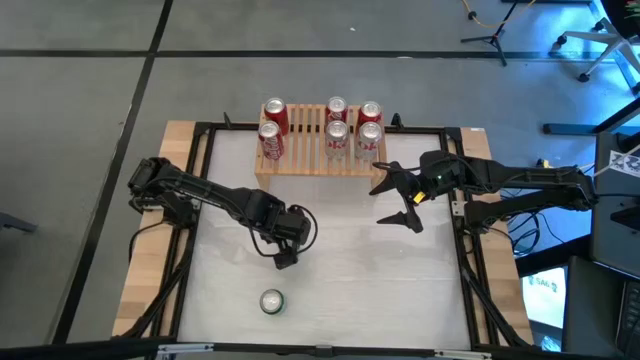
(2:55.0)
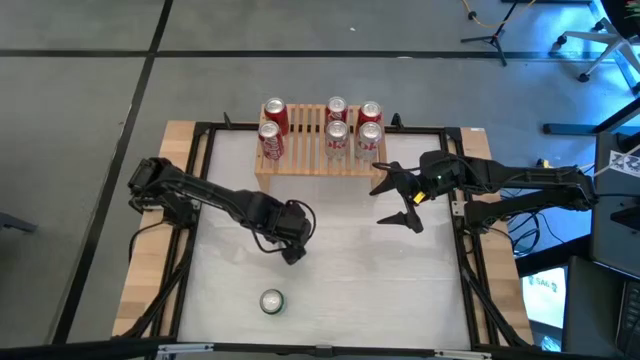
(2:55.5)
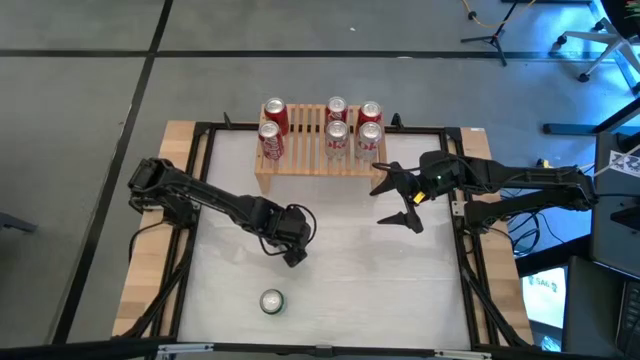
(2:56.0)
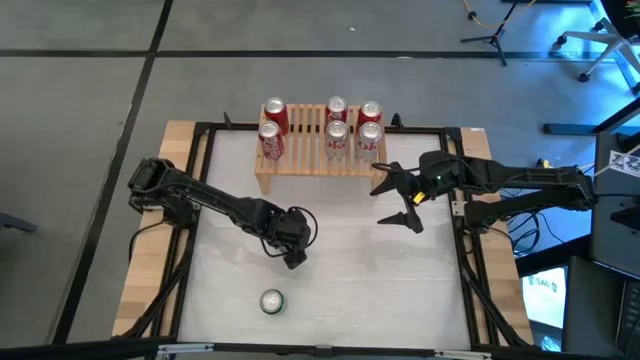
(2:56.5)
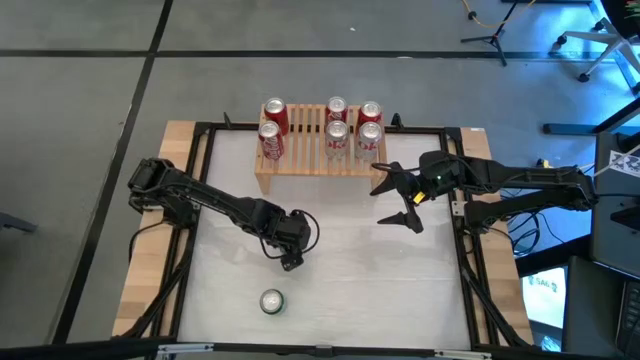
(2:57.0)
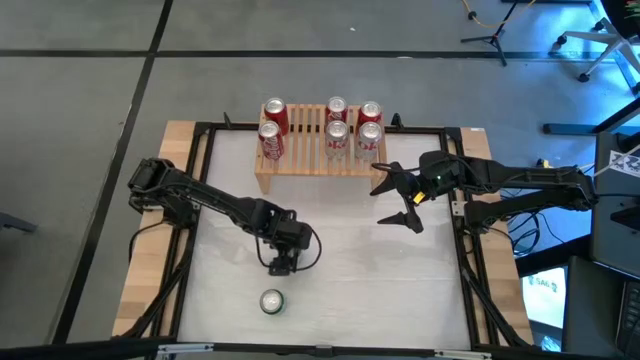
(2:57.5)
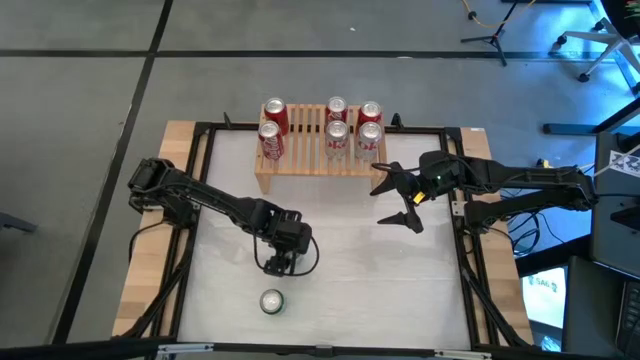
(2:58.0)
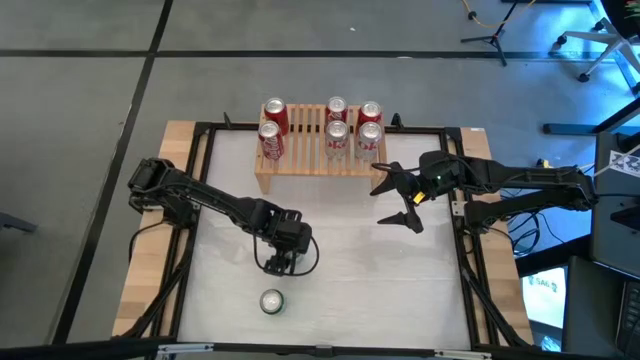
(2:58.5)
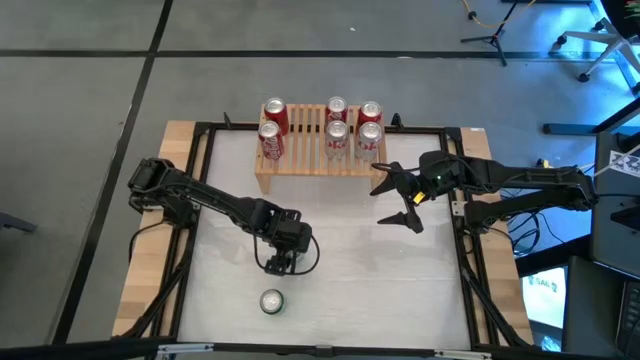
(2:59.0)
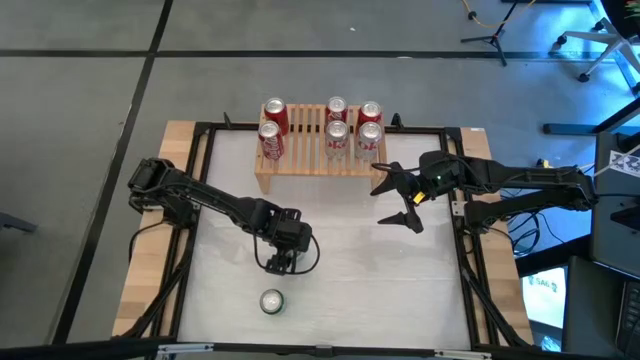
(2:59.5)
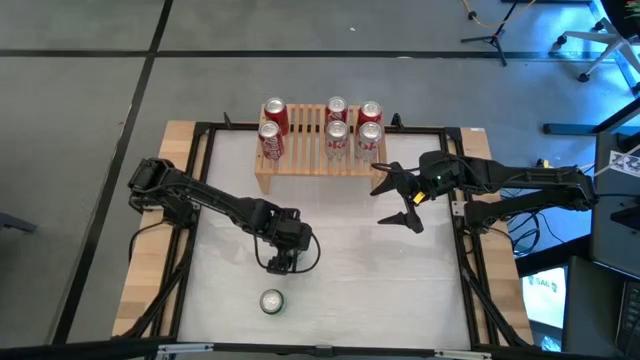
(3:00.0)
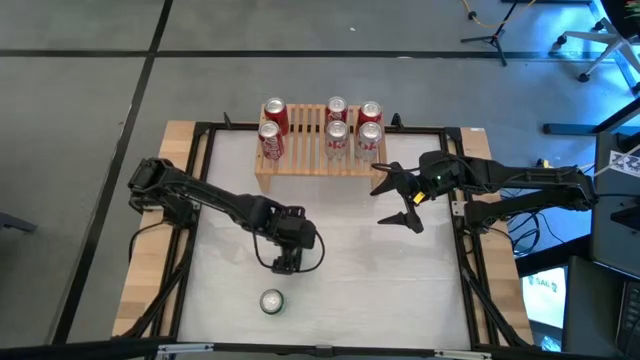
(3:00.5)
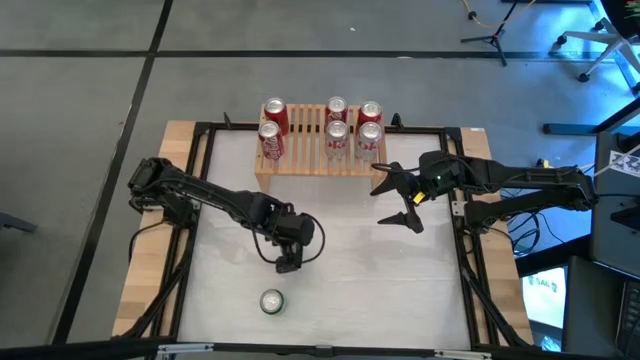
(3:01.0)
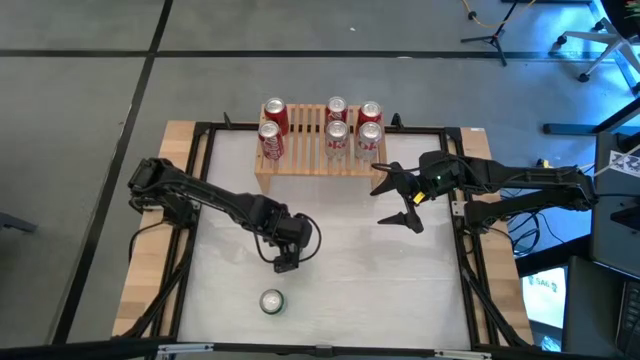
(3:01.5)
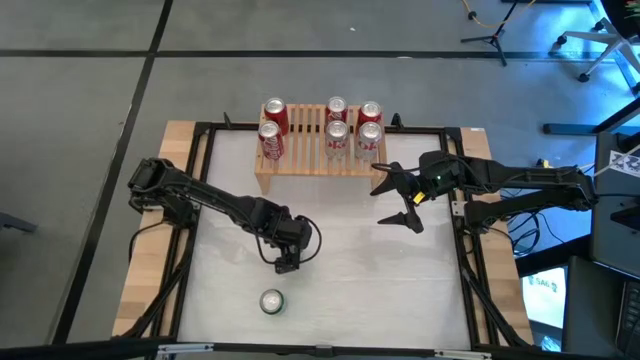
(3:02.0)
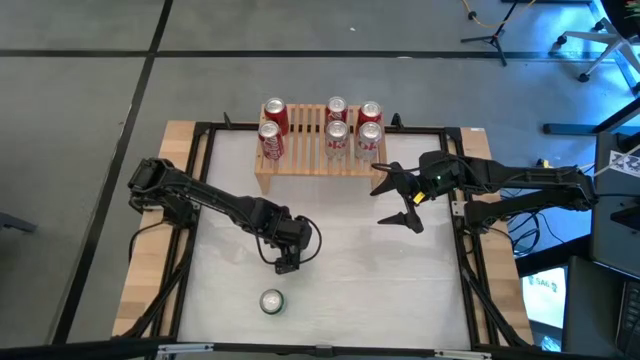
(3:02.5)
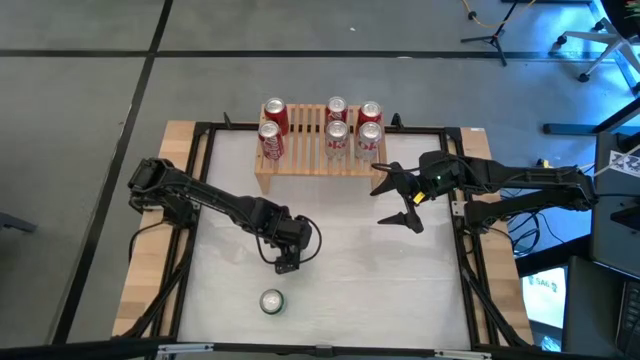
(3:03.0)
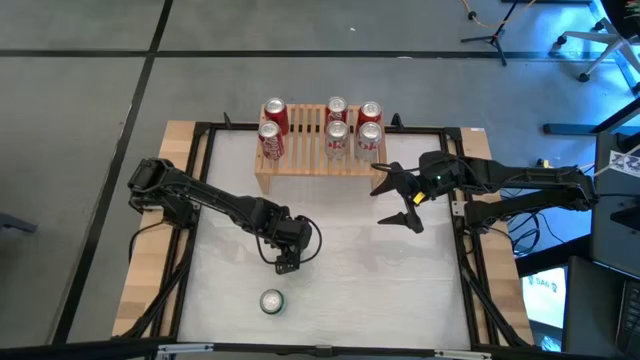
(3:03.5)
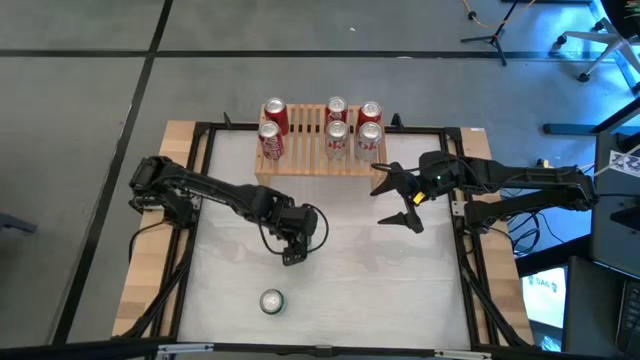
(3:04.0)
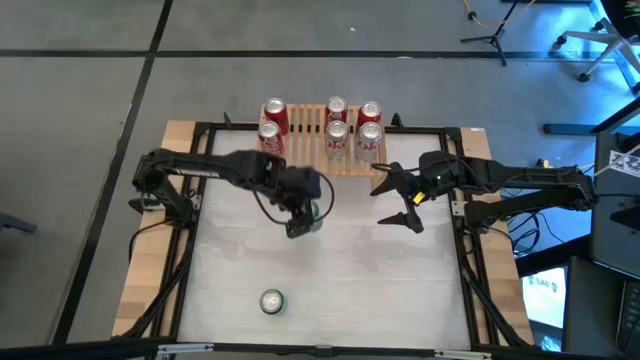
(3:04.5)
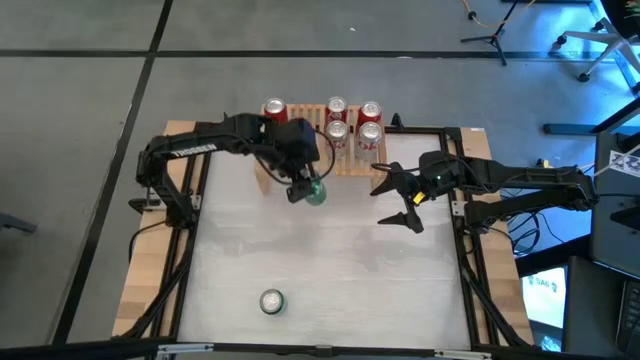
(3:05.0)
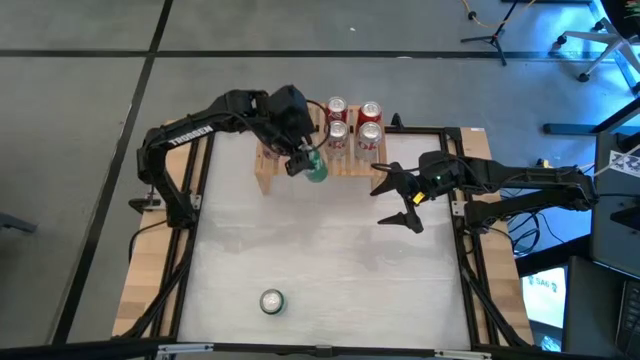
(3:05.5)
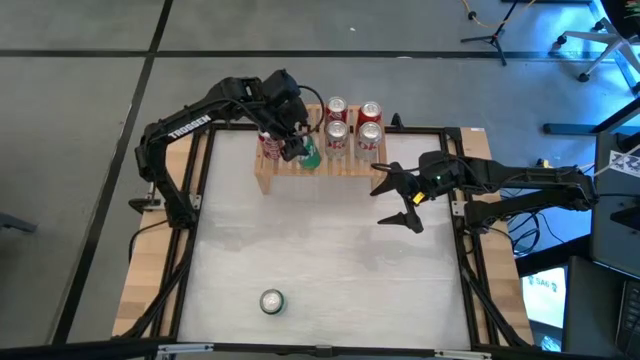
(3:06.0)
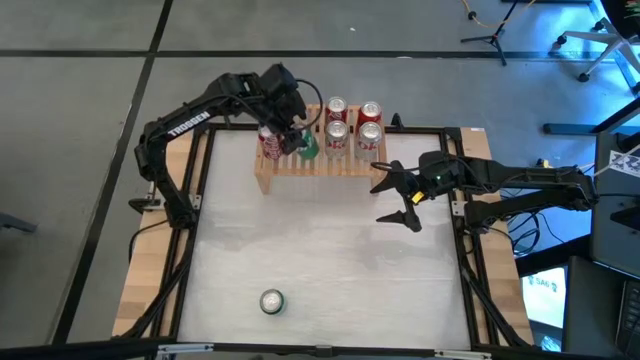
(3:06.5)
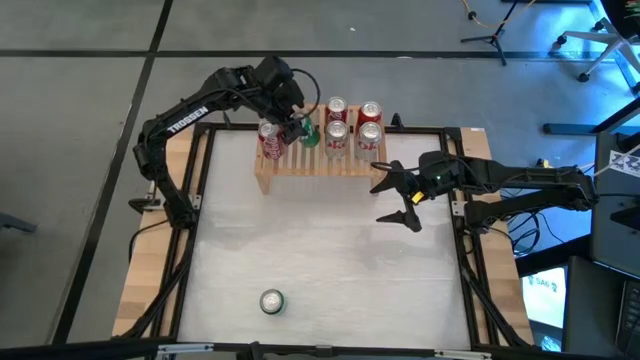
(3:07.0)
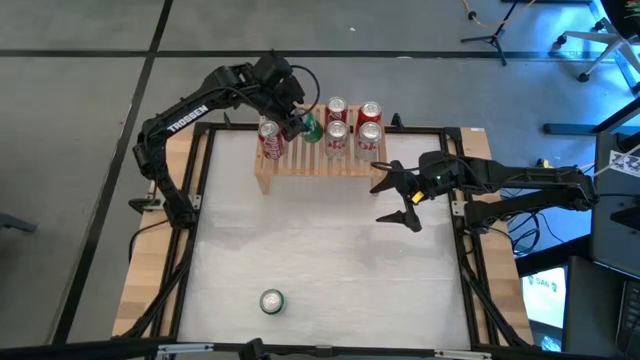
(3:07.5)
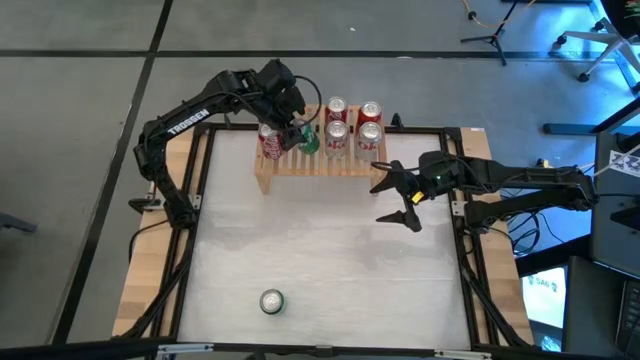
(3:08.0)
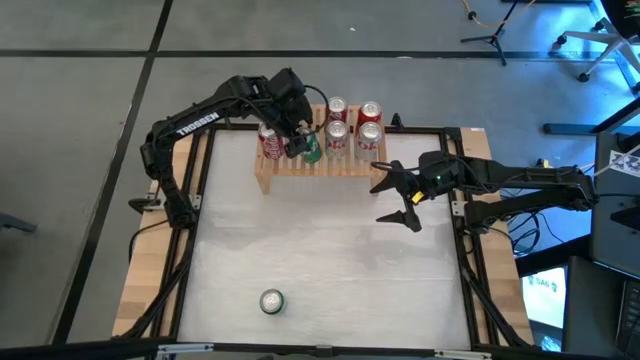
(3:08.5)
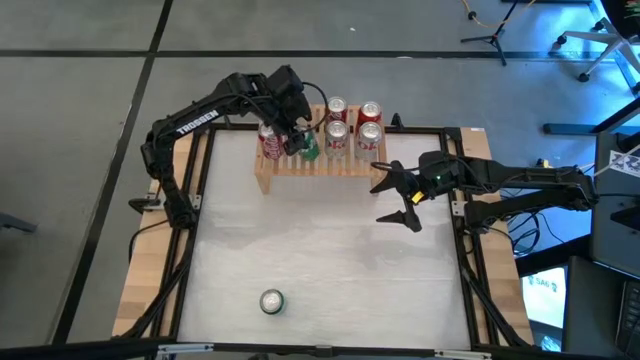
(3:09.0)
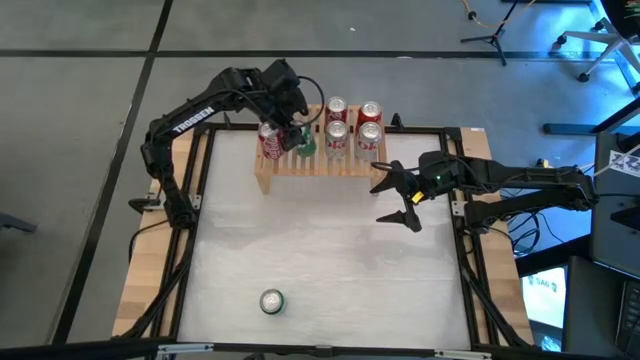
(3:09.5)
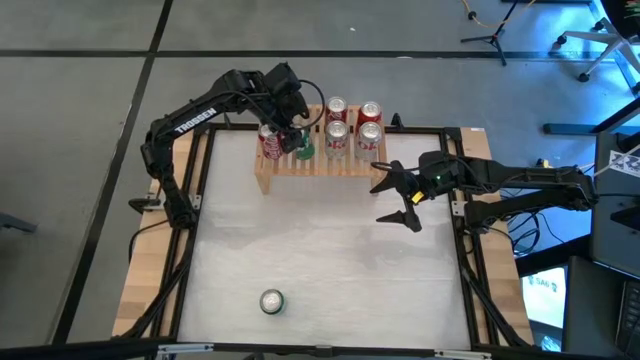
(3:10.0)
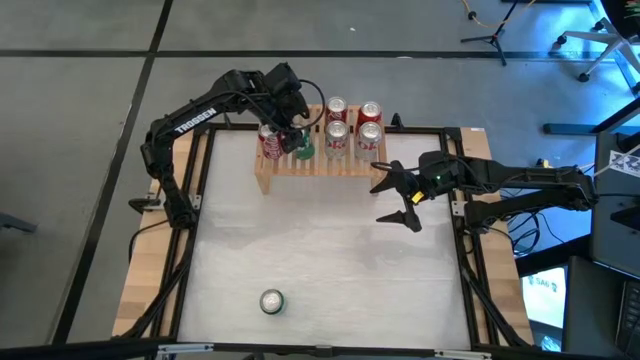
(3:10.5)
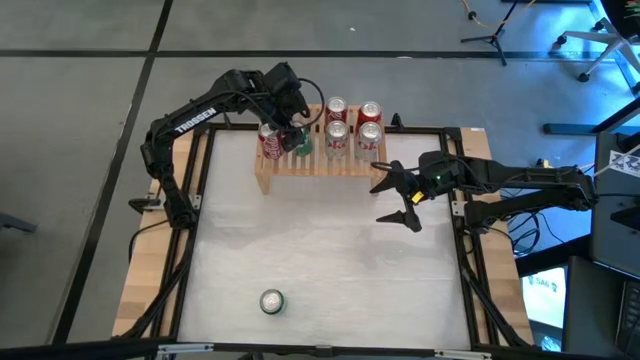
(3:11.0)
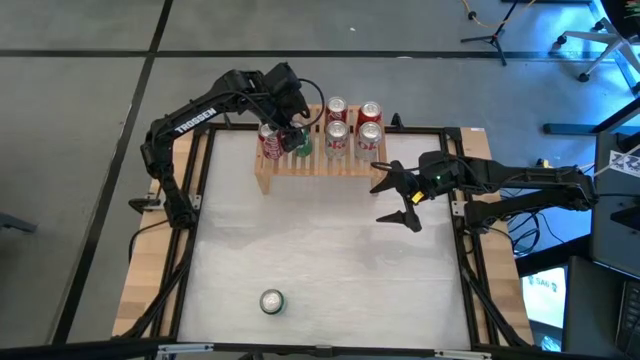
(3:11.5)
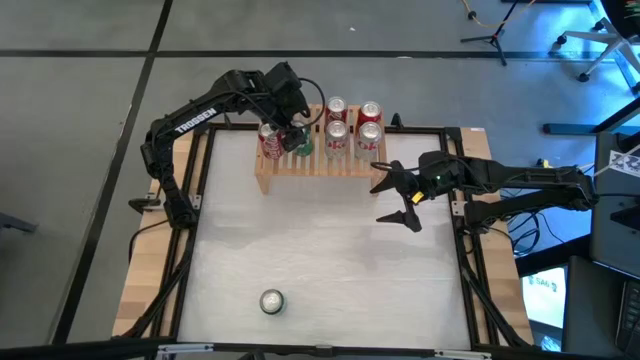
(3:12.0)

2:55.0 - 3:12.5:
Task: Place canned beverage on shelf
Put the top green soda can on the shelf

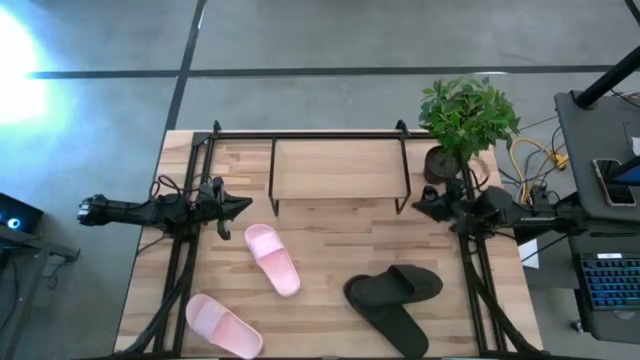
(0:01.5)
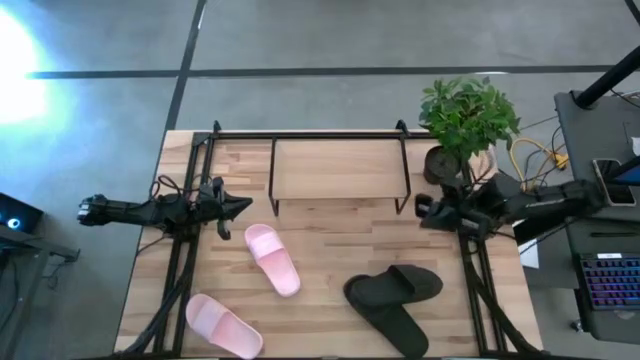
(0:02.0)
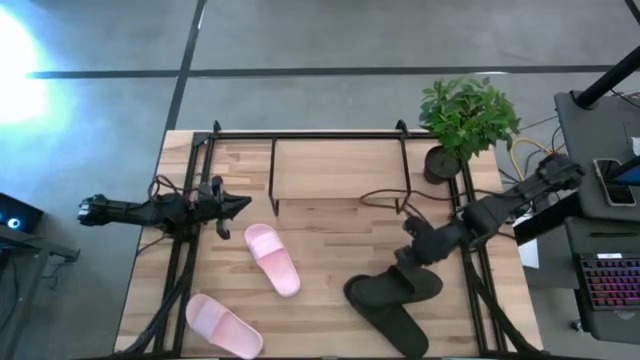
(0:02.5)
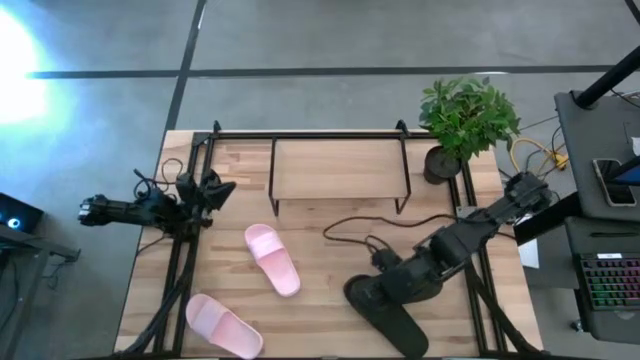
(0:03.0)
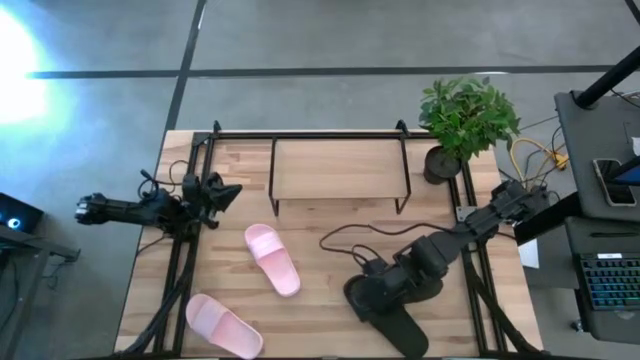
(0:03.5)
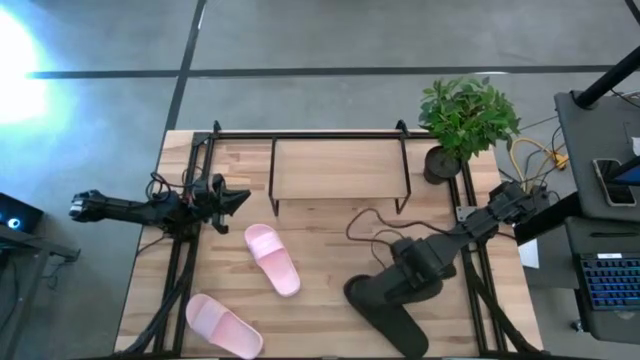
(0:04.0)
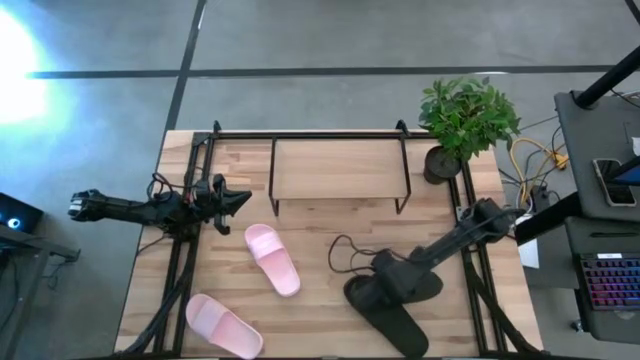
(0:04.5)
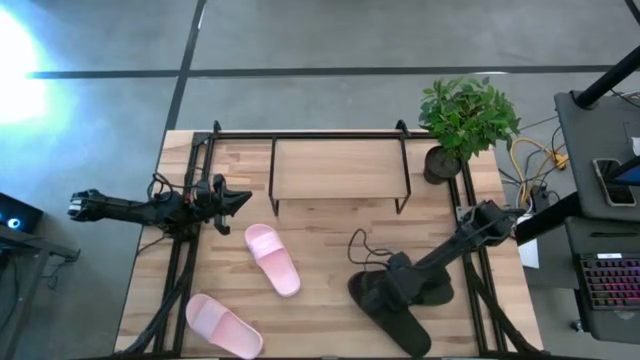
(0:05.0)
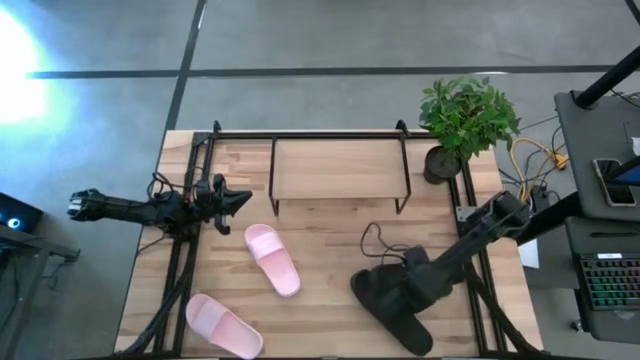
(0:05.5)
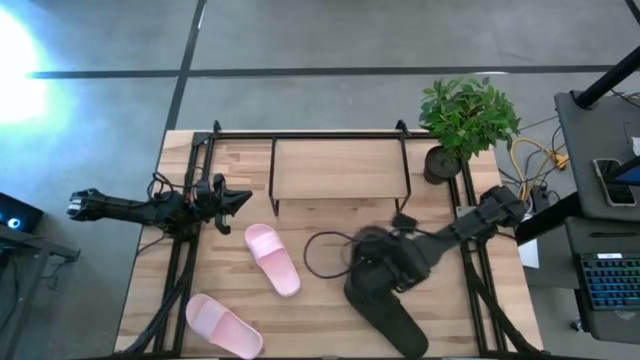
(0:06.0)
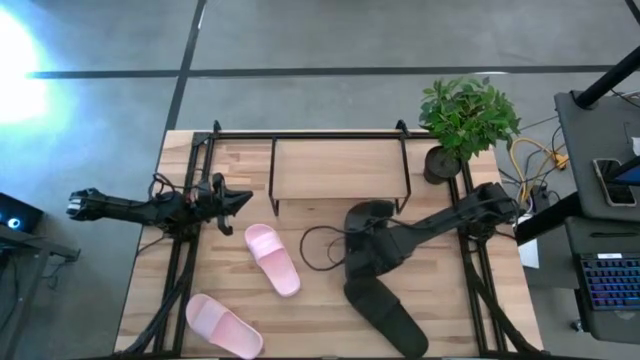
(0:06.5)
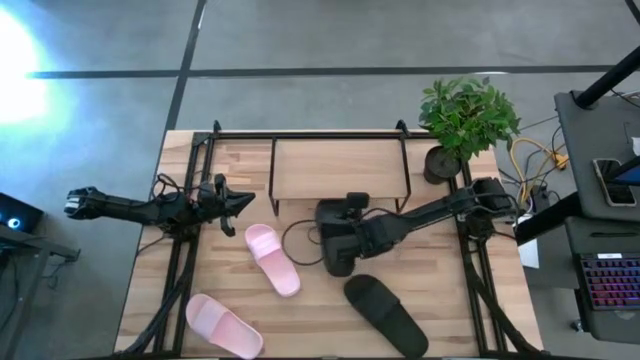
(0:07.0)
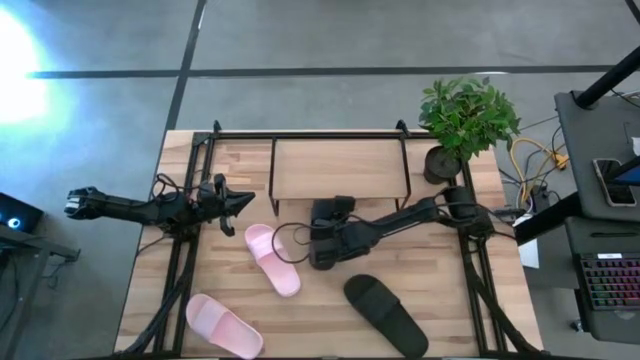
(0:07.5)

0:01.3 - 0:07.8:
Task: Pick and place slides into the shelf
Put the top black slide under the shelf
